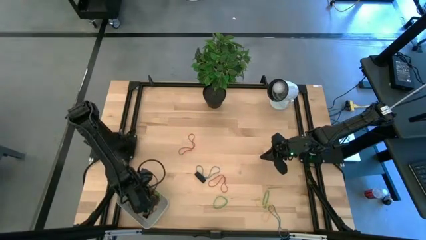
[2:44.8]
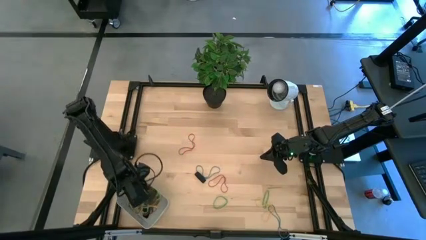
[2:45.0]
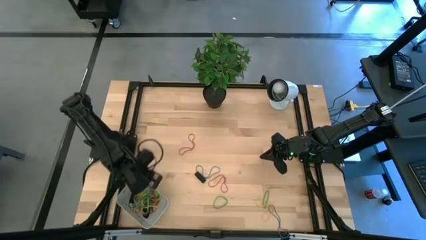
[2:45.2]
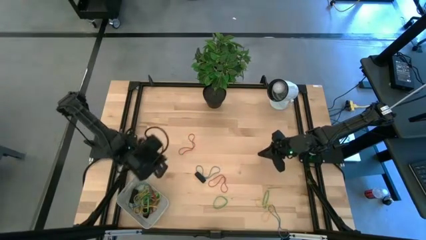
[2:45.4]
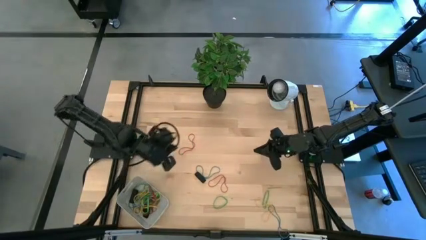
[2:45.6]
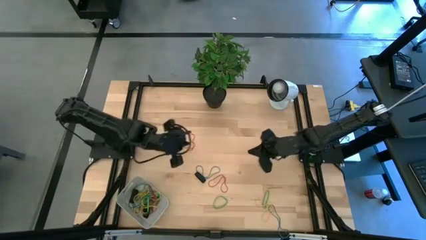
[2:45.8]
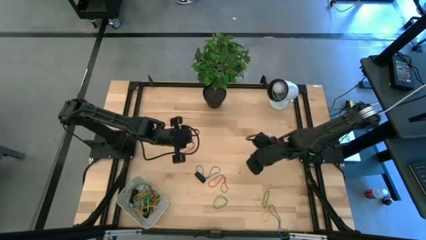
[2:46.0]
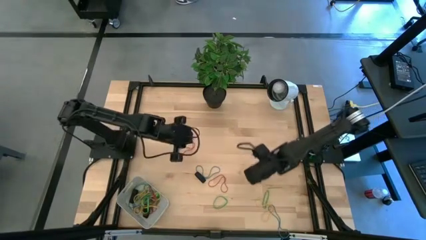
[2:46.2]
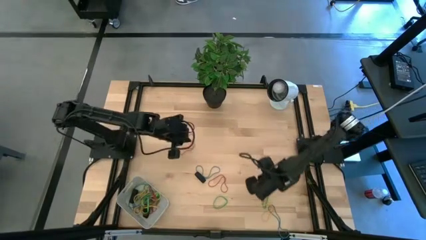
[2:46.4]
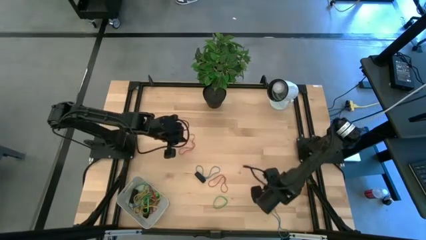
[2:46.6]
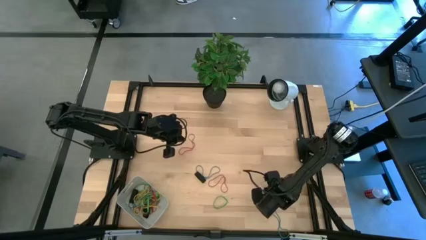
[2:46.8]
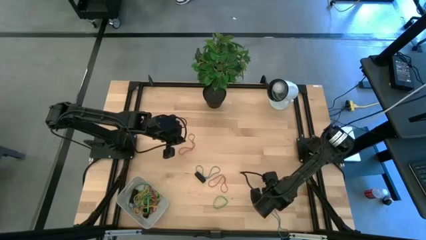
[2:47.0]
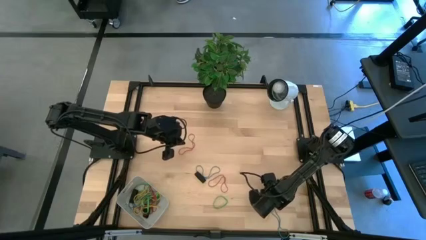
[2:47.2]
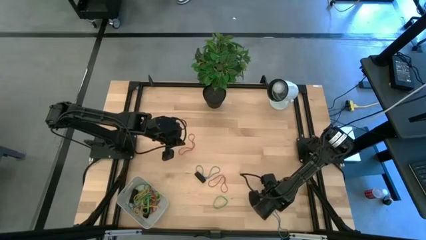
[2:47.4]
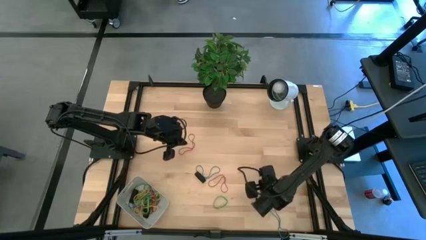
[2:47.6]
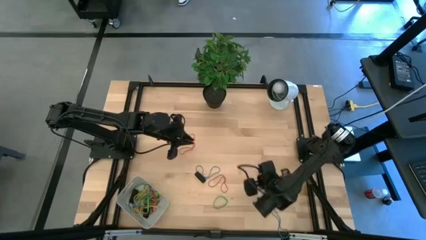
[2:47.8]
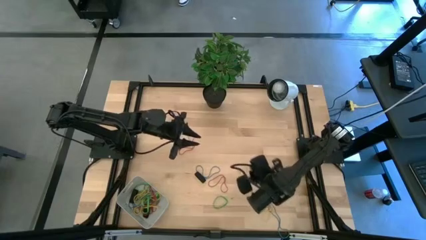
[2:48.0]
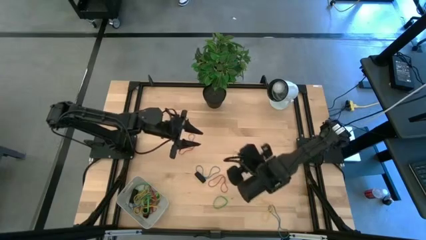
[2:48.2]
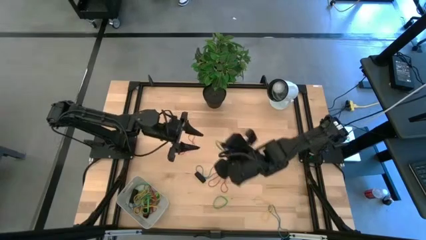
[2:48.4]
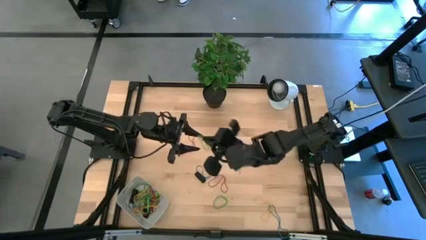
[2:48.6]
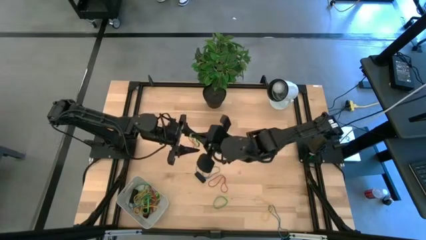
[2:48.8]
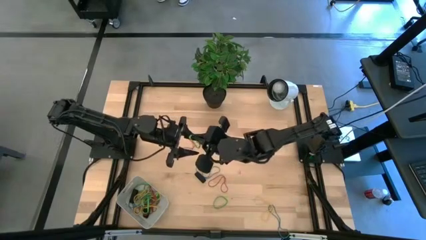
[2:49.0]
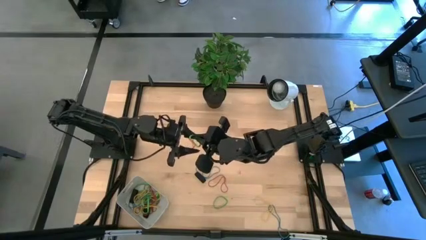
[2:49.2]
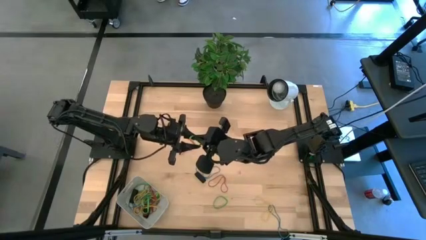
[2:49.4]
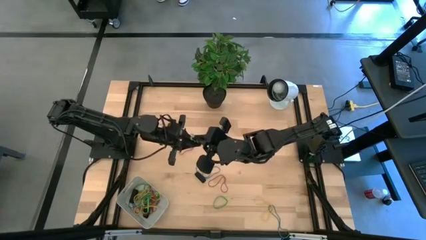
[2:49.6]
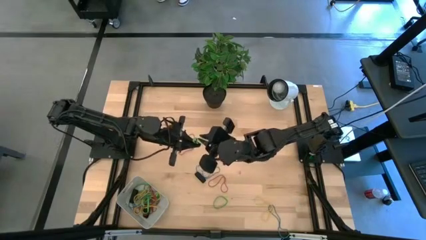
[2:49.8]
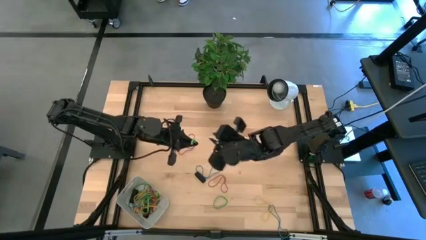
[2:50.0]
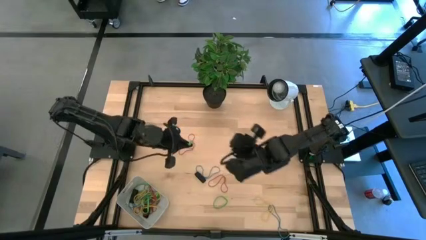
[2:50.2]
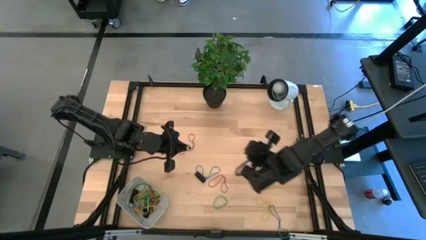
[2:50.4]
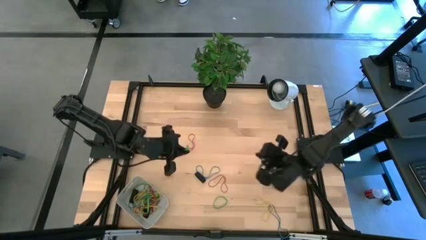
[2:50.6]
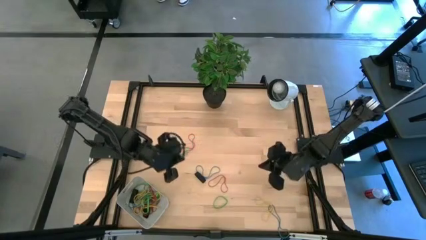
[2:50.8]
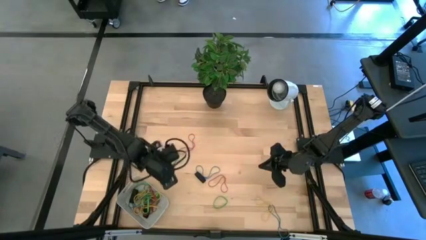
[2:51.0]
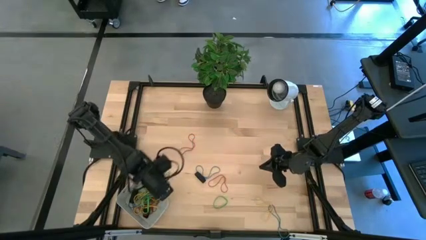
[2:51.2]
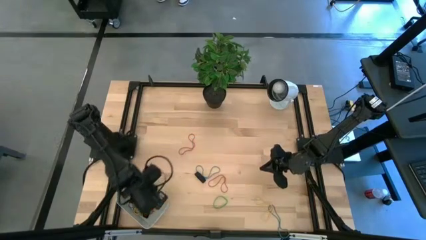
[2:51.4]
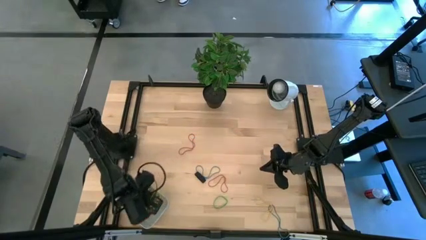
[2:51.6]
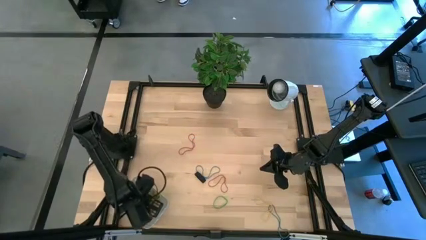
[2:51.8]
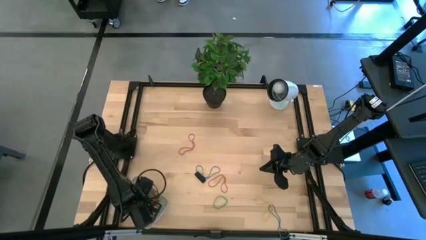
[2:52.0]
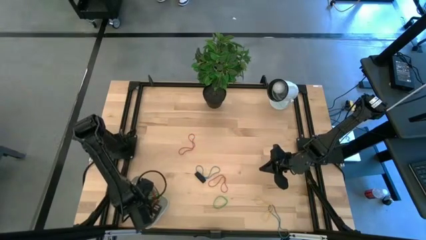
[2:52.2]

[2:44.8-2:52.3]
Task: Pick and place rubber bands into bin
Put the right green rubber band into the gray bin

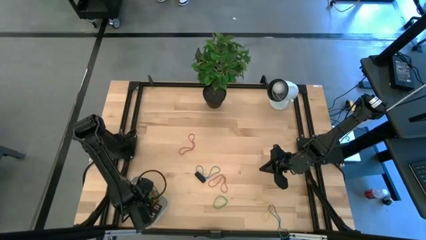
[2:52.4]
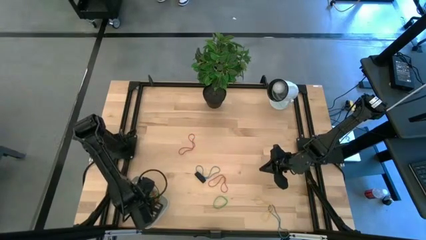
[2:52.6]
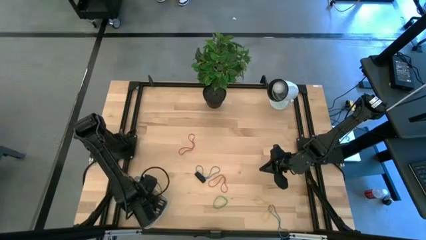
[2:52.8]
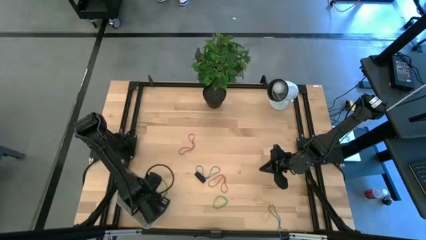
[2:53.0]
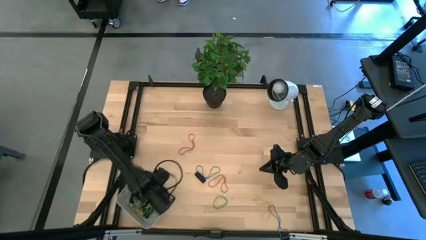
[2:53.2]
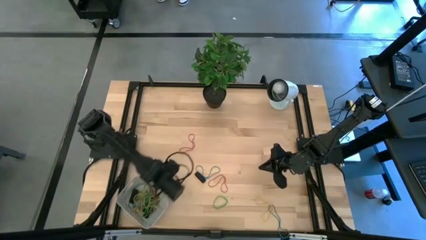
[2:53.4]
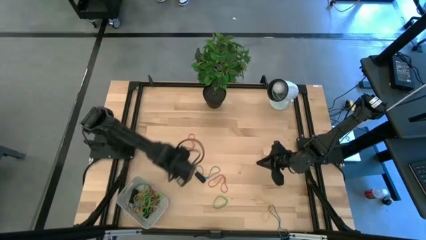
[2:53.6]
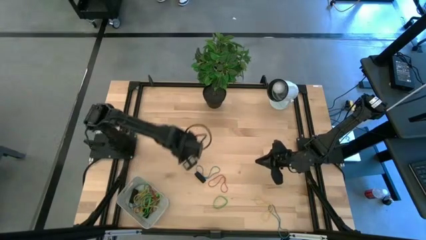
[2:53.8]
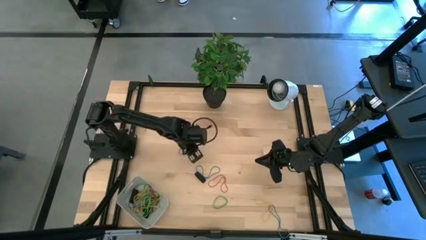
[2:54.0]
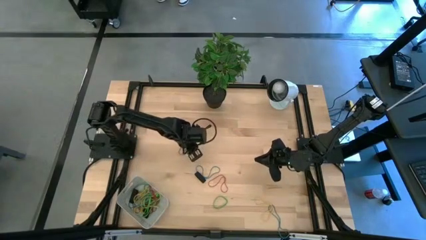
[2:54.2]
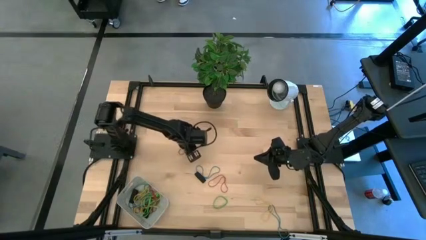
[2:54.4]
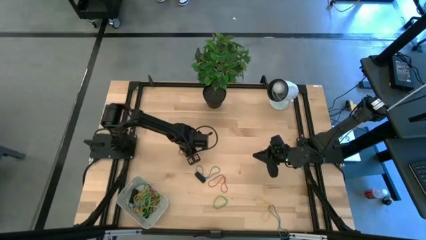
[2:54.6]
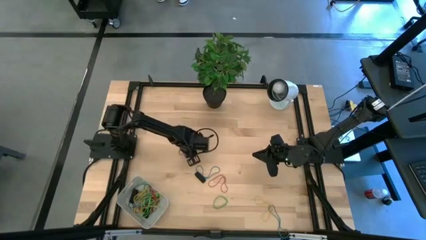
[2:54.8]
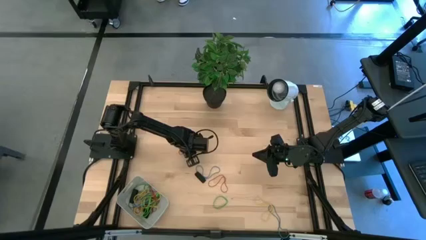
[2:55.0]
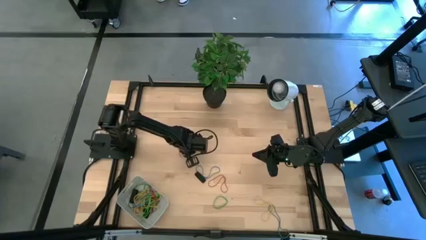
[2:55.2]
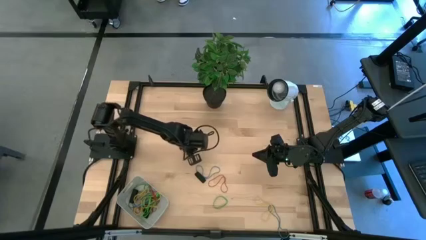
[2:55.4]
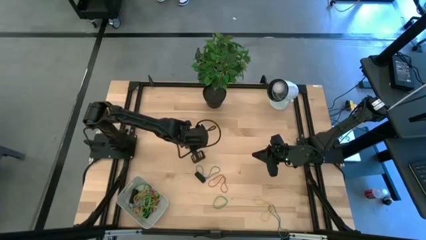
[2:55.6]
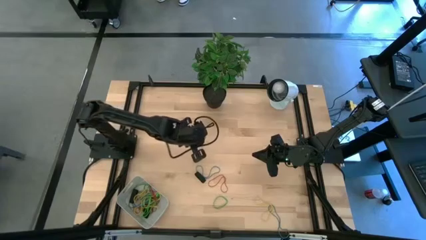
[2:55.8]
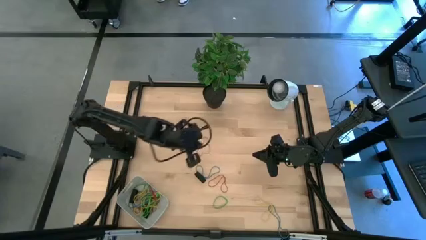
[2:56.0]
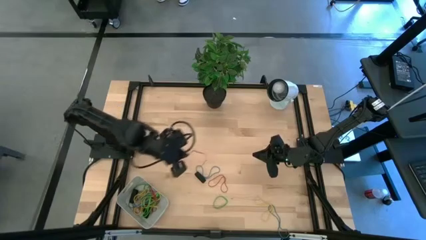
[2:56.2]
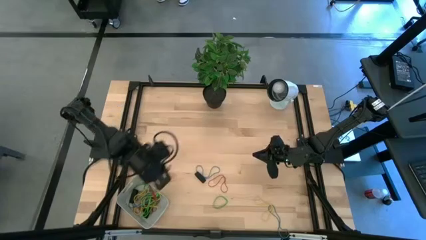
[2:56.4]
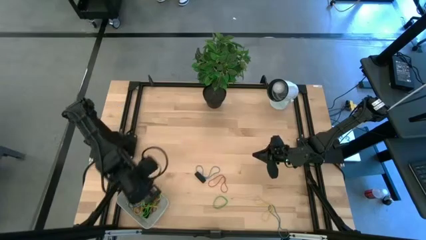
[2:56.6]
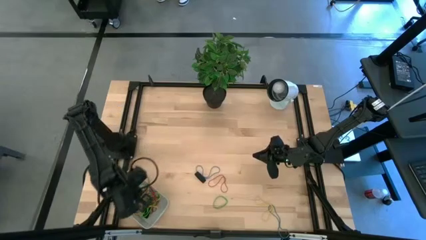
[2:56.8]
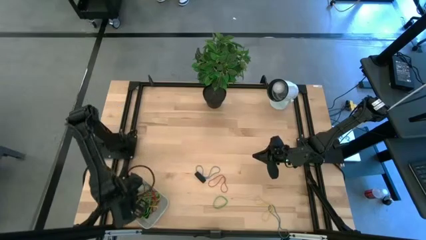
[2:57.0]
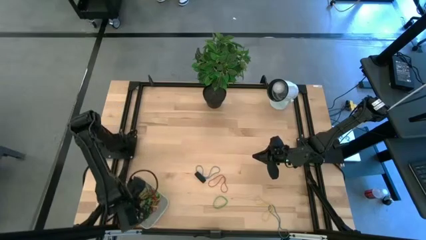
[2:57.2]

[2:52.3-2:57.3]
Put the top red rubber band into the gray bin
